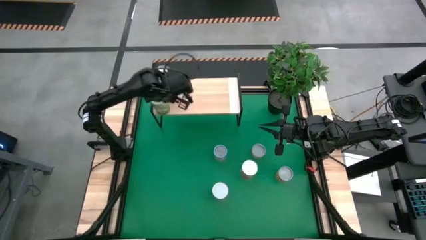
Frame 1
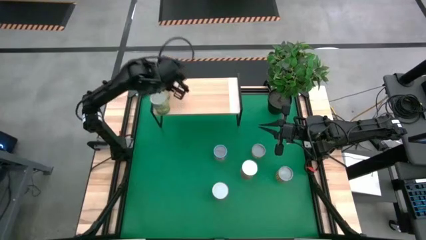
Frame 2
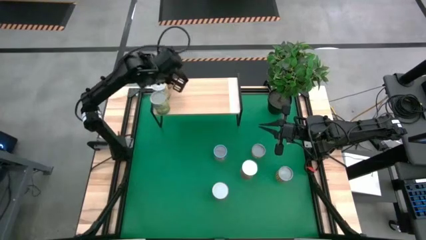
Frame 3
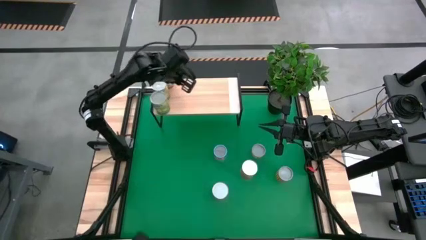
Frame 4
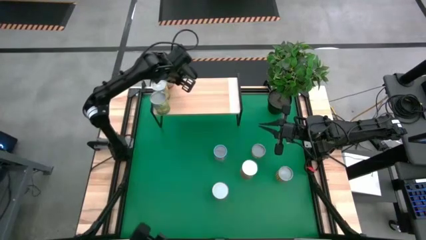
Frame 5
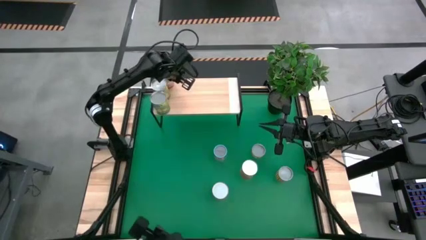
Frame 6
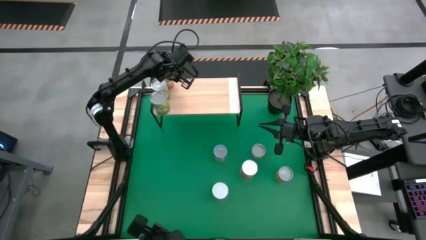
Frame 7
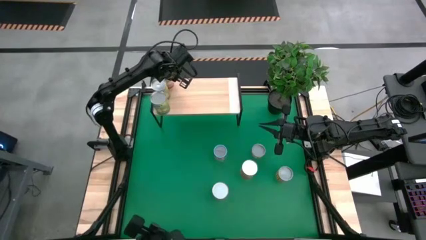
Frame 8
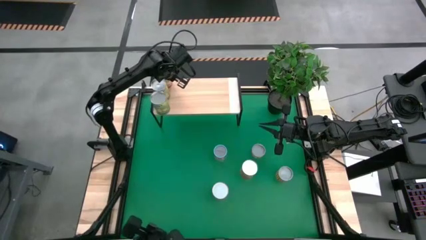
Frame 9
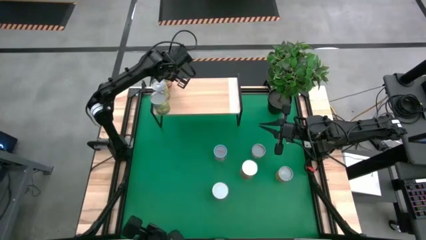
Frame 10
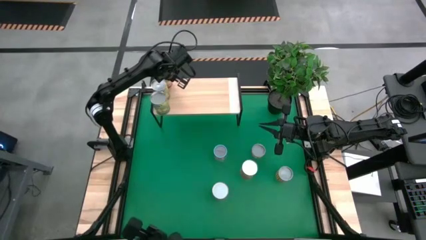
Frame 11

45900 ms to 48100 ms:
Task: Pick and place cans onto a shelf
Adjust the corn can on the shelf

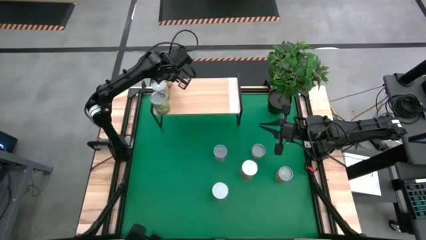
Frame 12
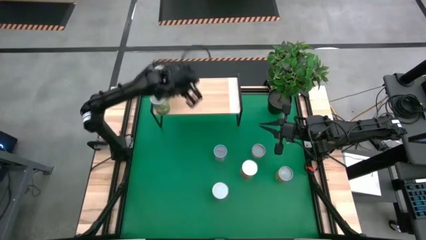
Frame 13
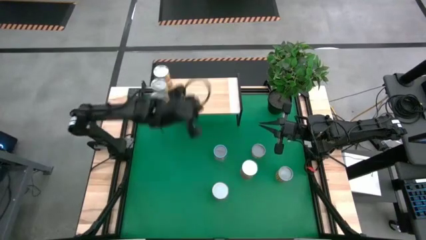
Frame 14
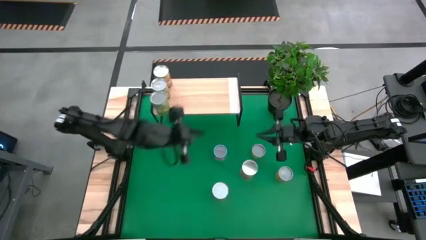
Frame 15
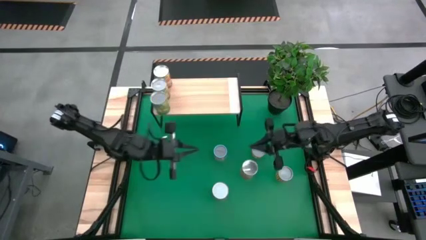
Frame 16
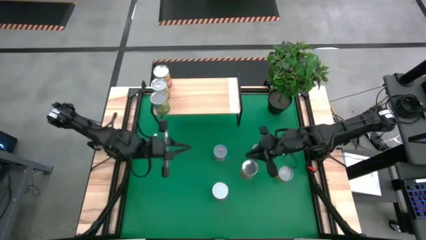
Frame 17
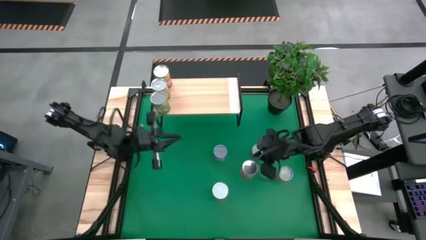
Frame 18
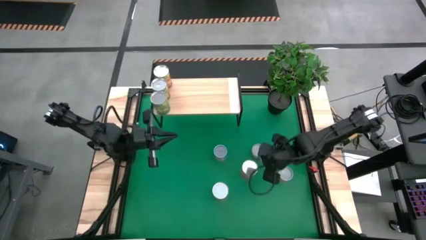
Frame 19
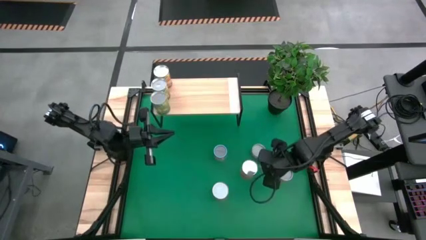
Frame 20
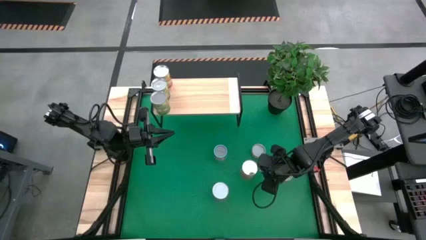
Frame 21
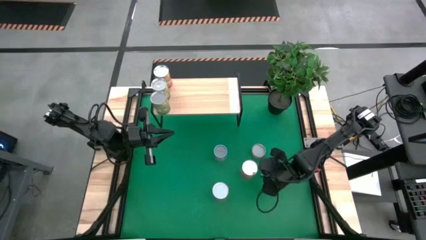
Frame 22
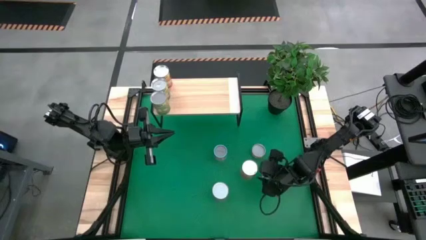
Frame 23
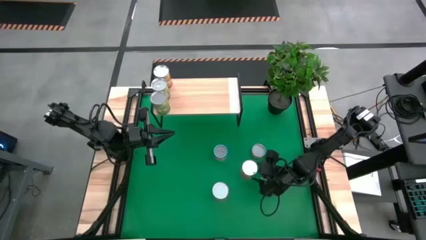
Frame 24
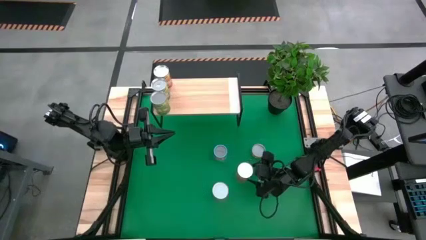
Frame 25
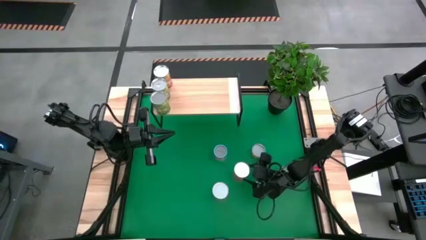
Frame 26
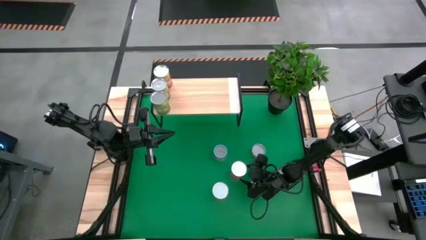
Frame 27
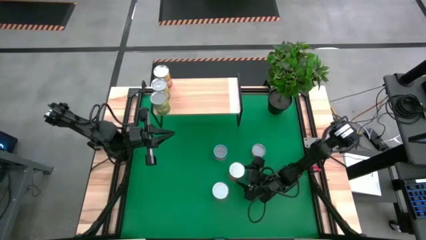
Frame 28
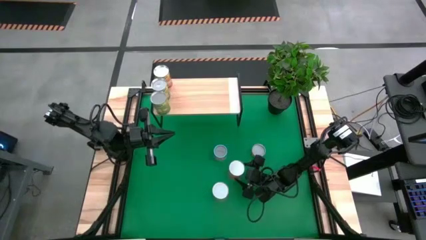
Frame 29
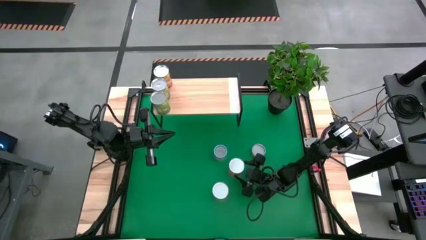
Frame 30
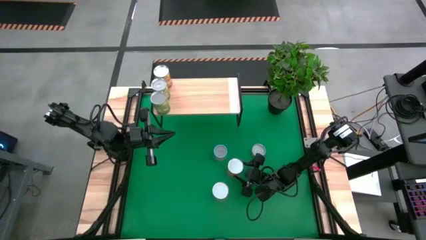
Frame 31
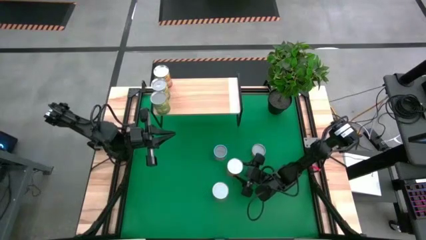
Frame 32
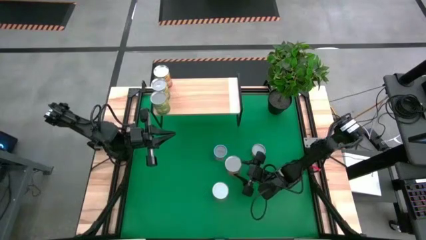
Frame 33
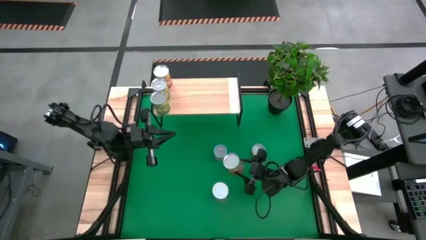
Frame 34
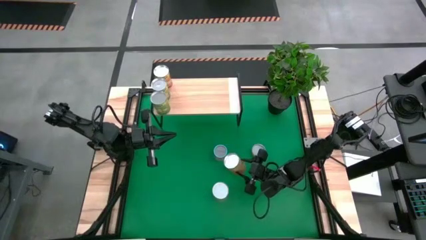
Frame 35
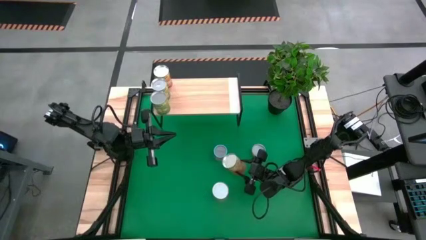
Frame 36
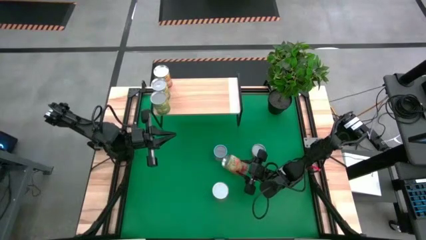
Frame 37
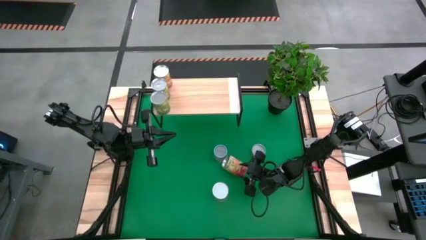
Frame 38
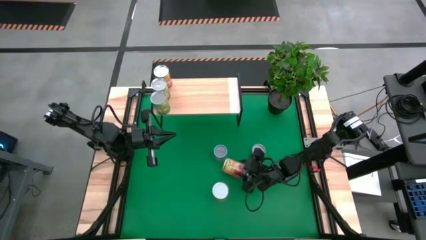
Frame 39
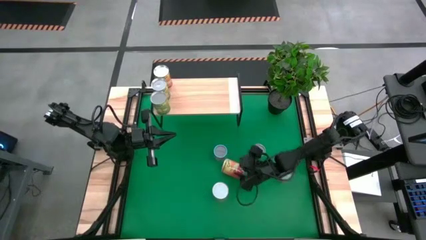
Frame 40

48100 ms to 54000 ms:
Put the corn can on the shelf

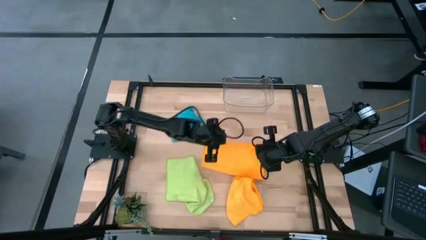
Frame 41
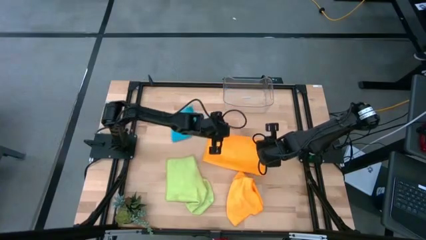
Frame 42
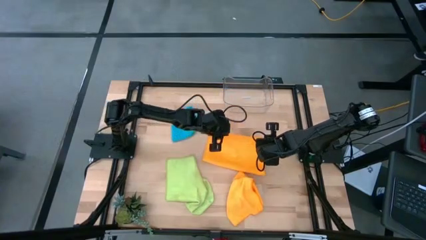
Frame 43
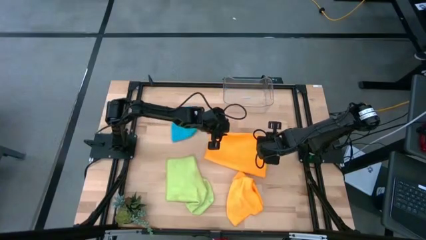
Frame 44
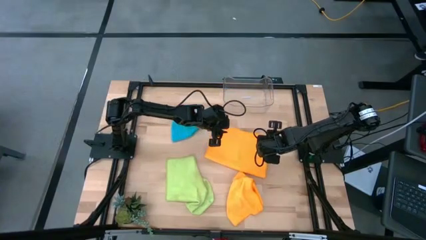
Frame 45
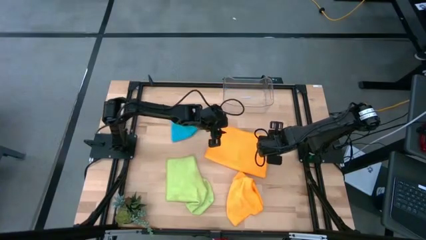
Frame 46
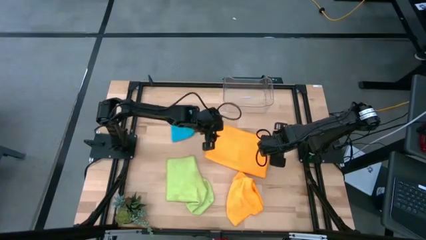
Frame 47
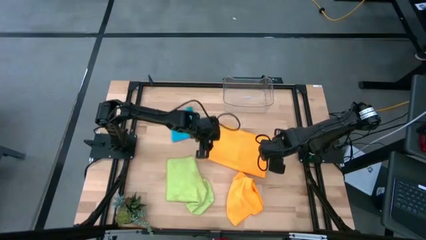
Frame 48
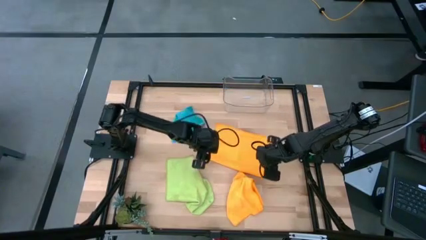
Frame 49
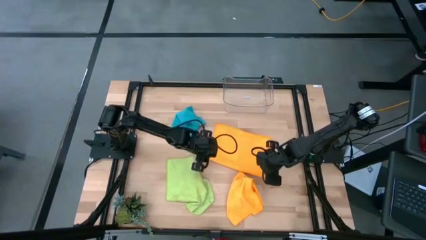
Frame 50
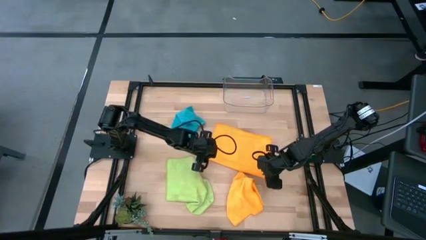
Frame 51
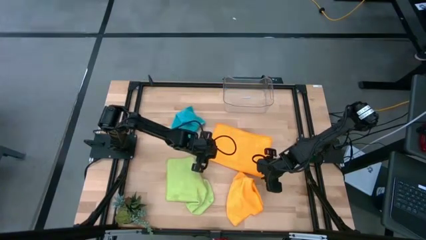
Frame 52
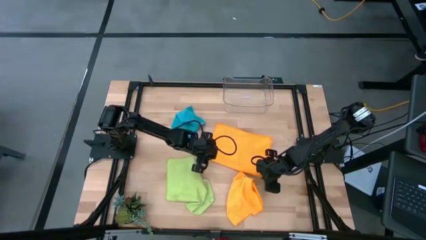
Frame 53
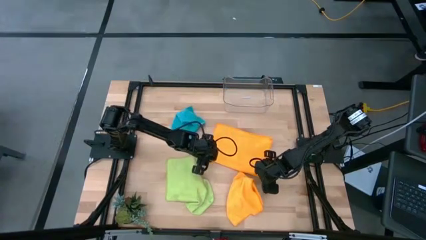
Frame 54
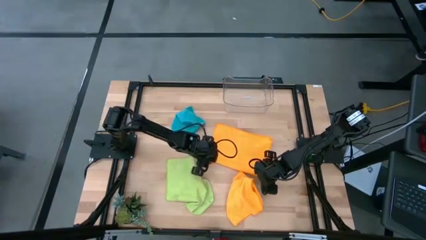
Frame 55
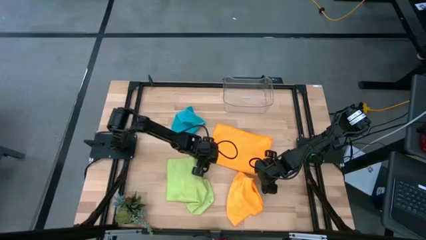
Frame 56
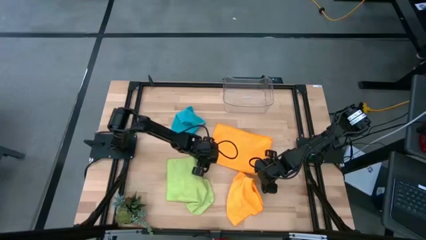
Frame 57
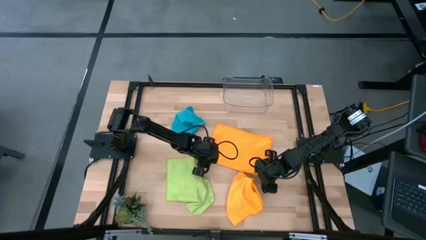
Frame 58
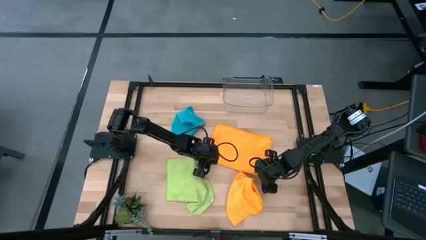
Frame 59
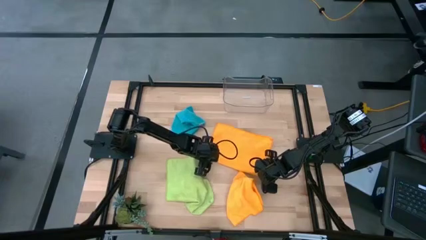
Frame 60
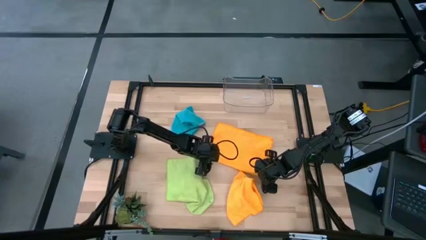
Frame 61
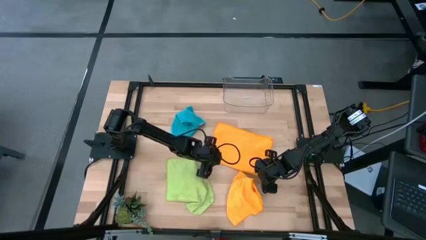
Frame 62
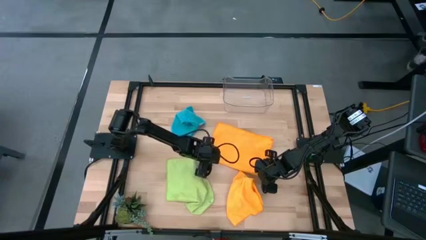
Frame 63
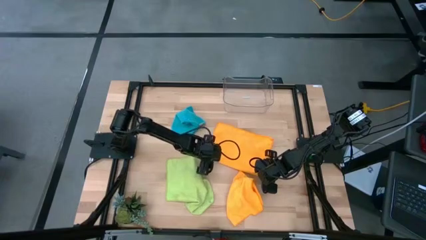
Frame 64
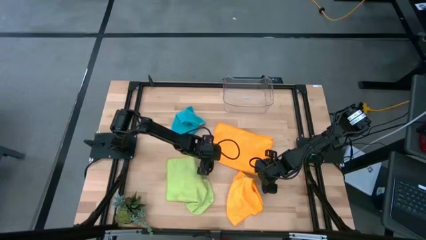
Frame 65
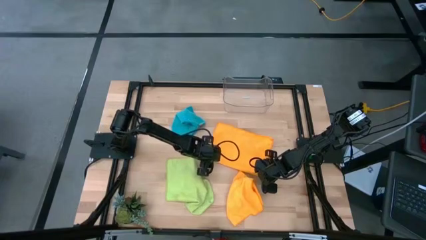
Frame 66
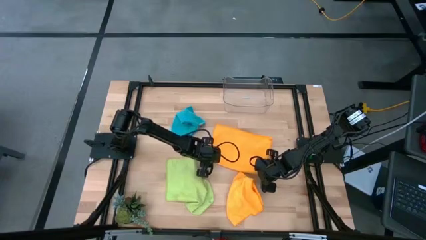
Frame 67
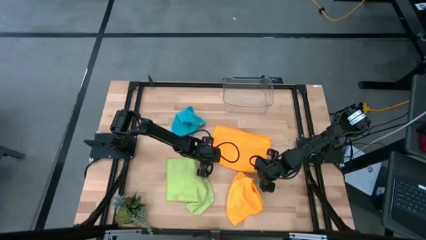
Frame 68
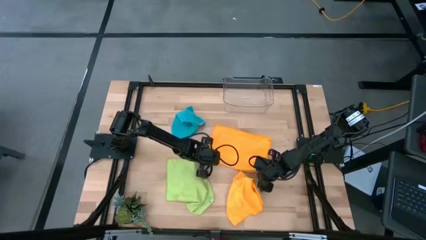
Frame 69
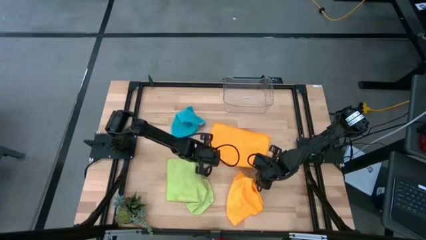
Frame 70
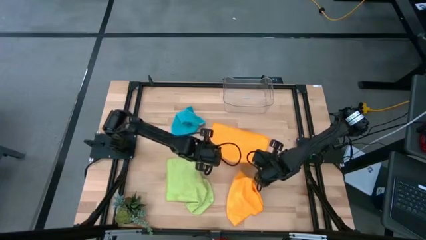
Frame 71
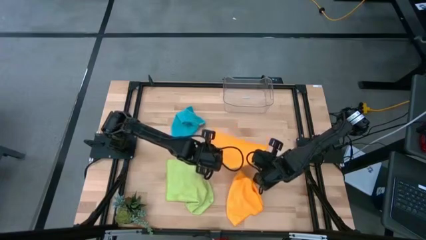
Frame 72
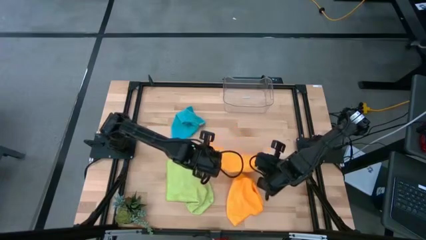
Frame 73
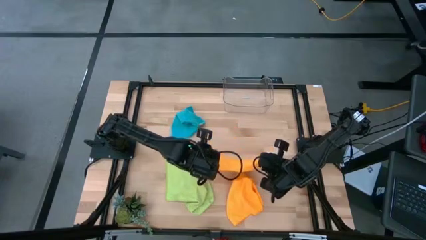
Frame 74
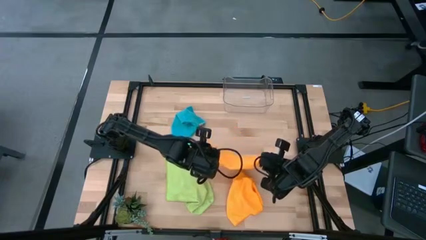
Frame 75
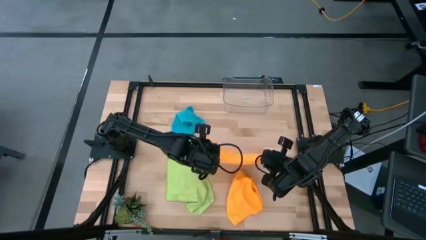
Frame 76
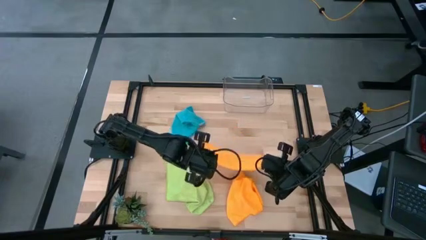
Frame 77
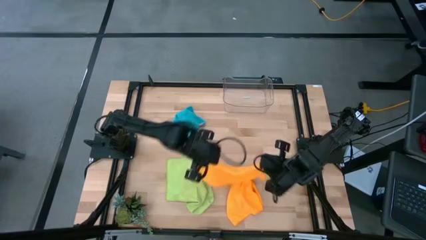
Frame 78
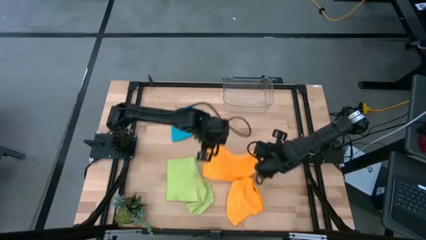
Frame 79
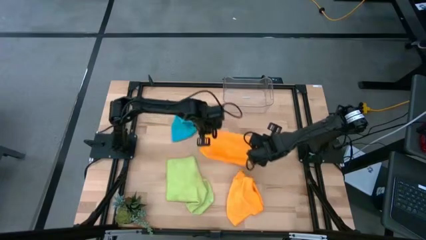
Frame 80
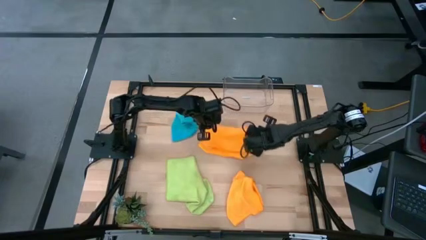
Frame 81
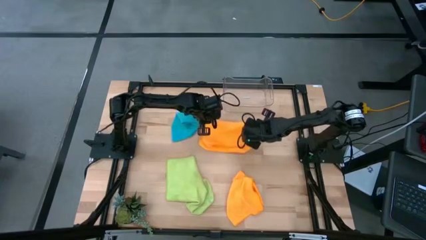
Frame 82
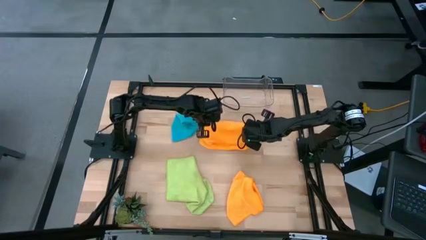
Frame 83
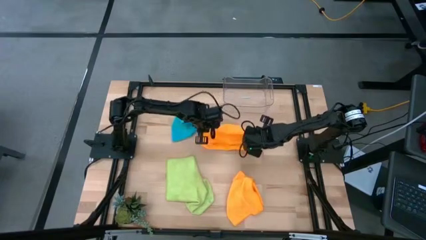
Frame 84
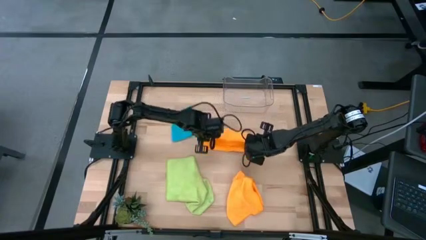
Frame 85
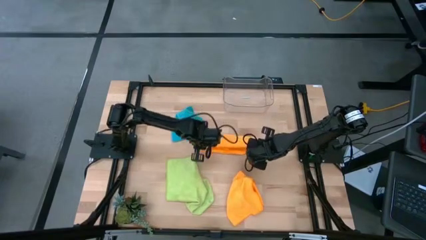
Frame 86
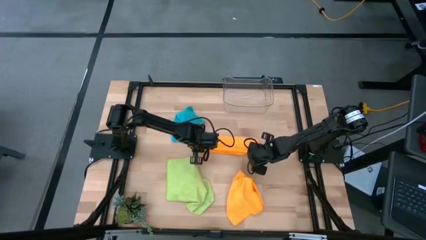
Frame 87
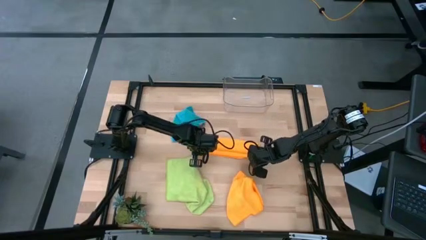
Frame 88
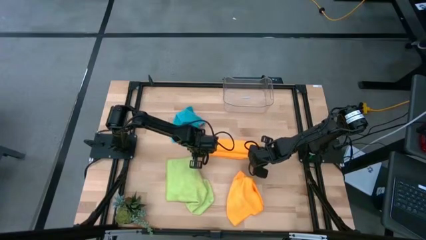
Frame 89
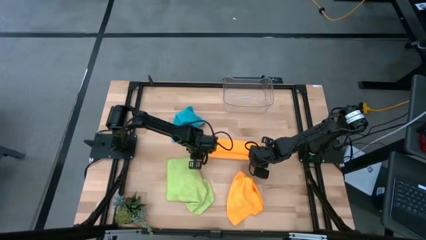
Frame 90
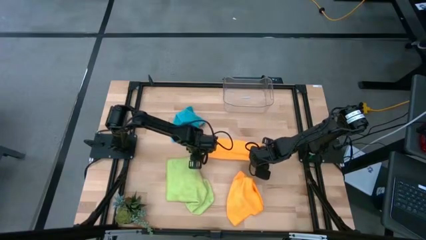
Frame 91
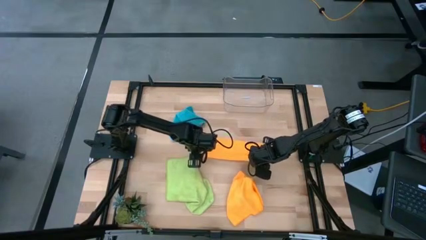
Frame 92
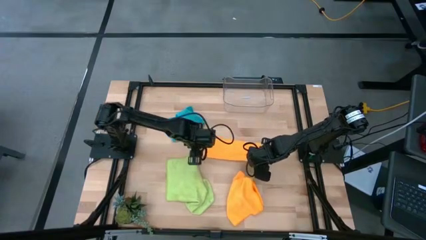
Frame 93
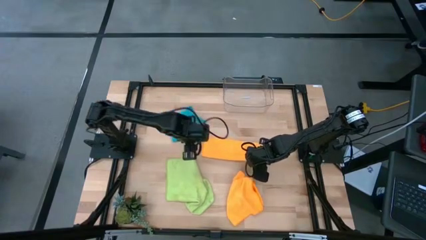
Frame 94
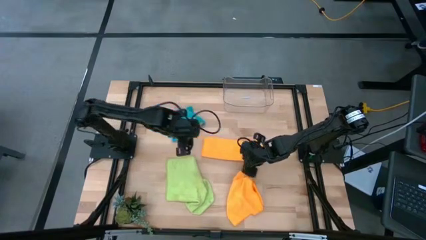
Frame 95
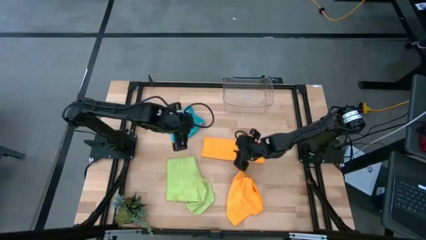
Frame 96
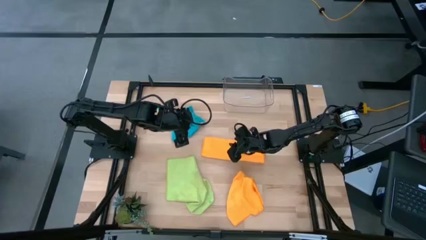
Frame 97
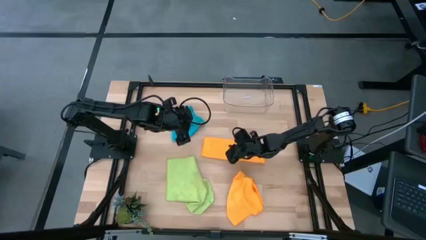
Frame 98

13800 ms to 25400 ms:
Task: Fold microfiber towels
Fold the top orange microfiber towel
